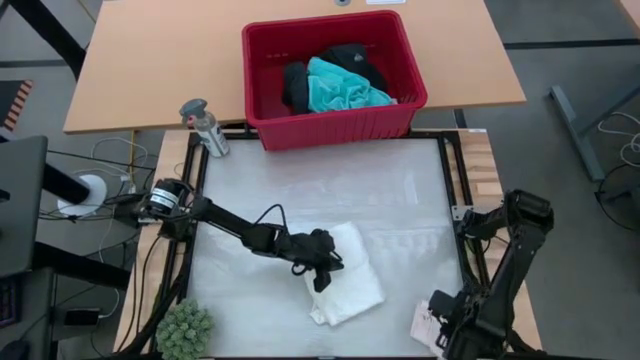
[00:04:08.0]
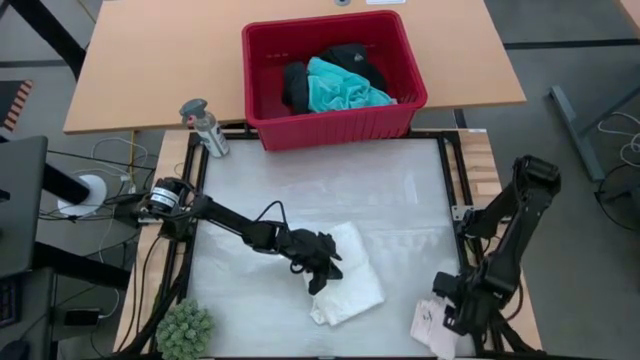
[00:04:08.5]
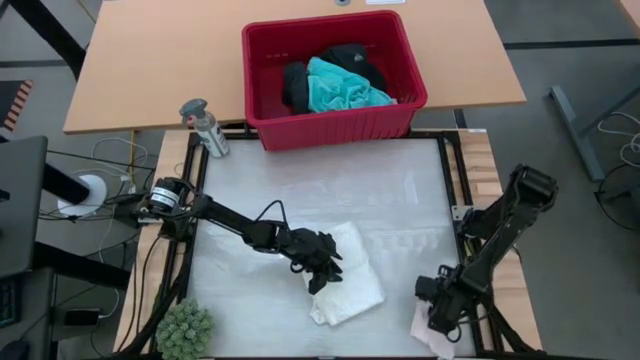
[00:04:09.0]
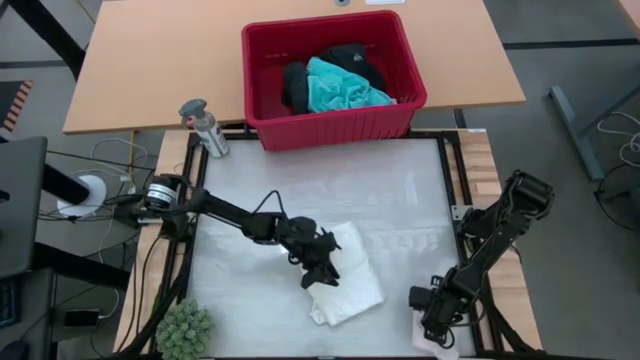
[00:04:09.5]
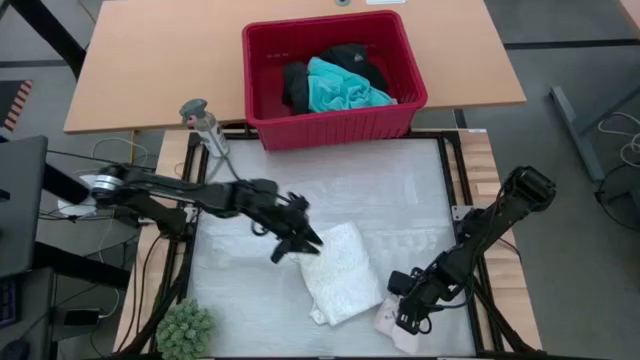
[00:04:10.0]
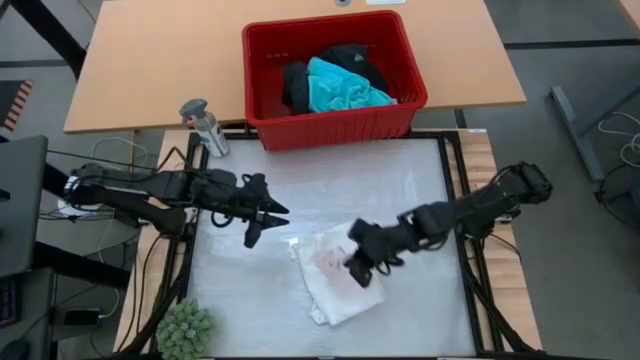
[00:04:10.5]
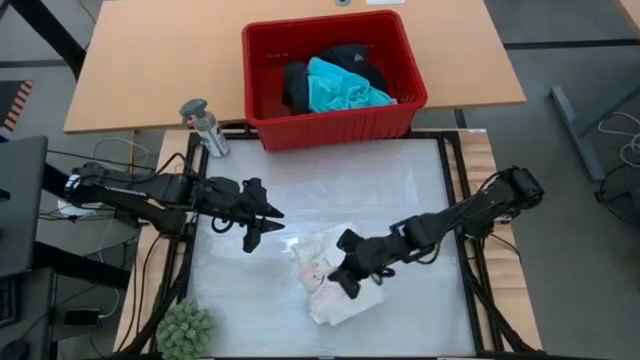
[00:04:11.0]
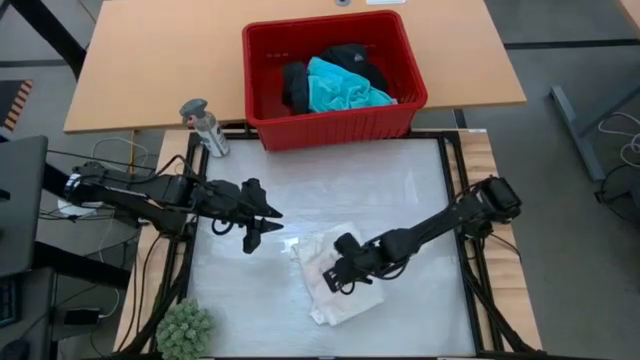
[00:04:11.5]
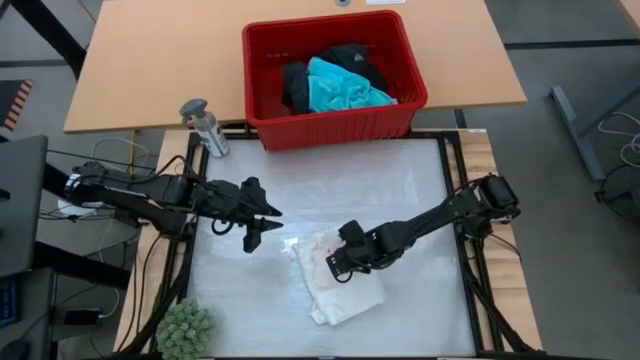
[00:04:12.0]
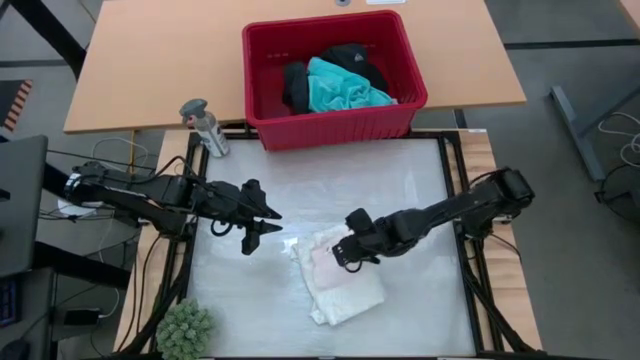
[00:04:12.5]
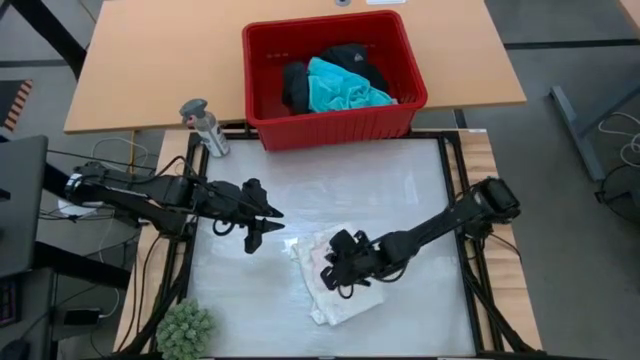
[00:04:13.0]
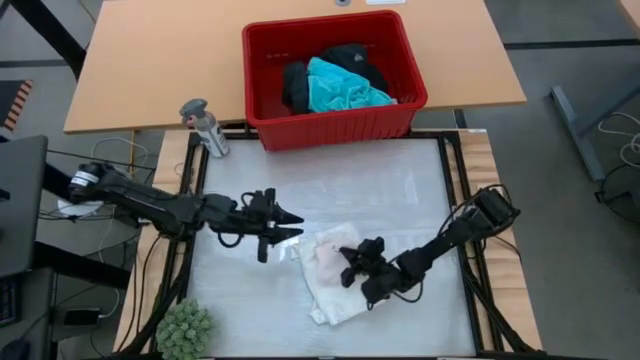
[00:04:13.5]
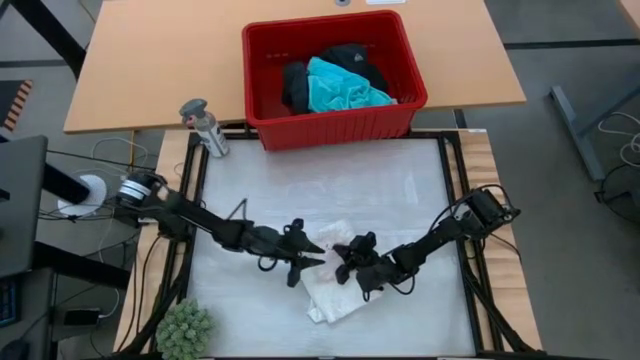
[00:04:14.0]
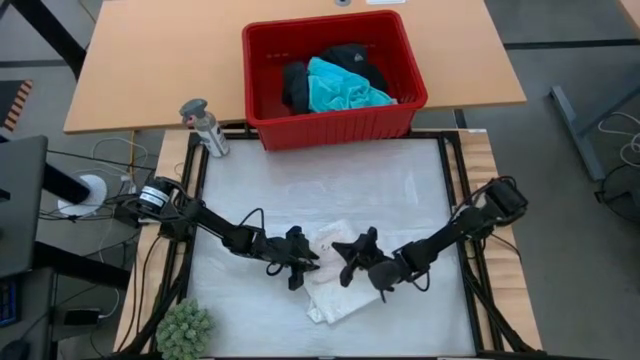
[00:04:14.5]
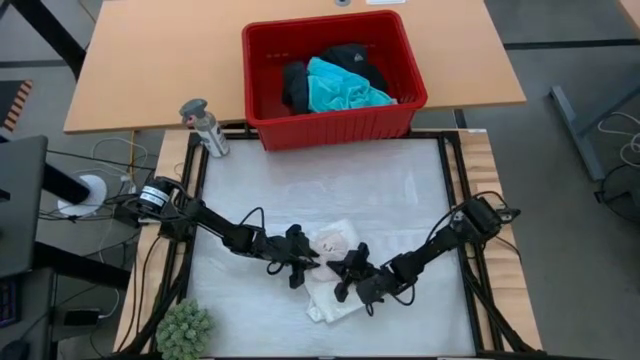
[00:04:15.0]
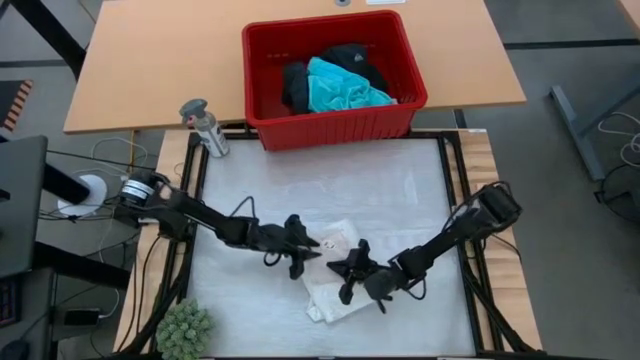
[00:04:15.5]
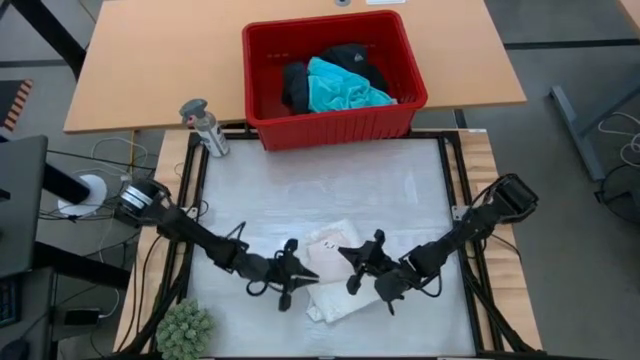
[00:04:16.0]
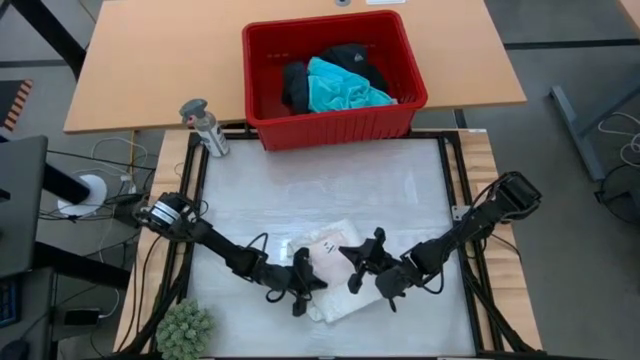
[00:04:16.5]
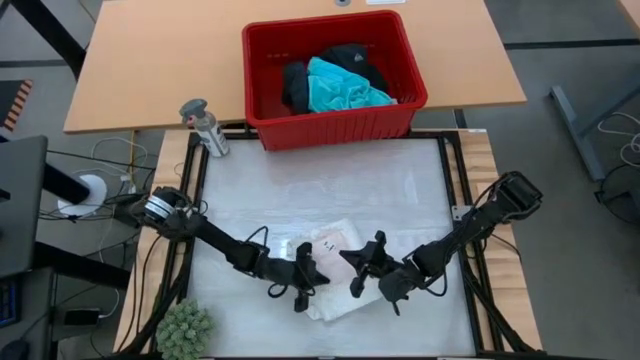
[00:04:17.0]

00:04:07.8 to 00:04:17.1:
Task: Fold Laundry from Bin
Stack the white underwear on top of the white blouse

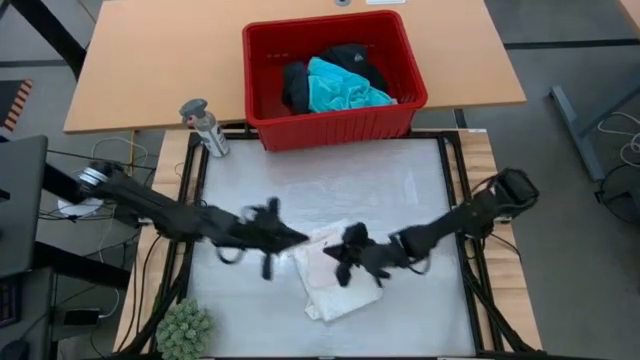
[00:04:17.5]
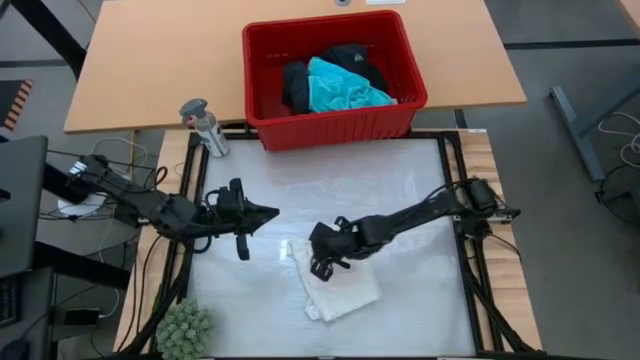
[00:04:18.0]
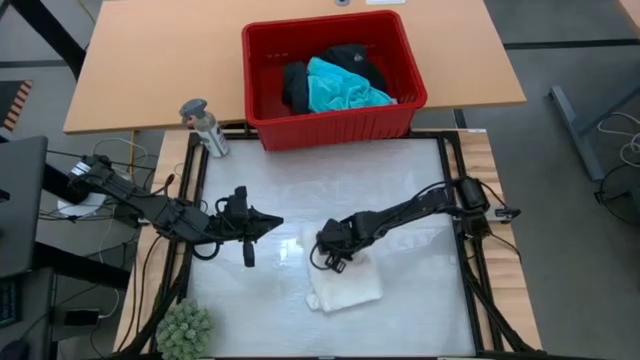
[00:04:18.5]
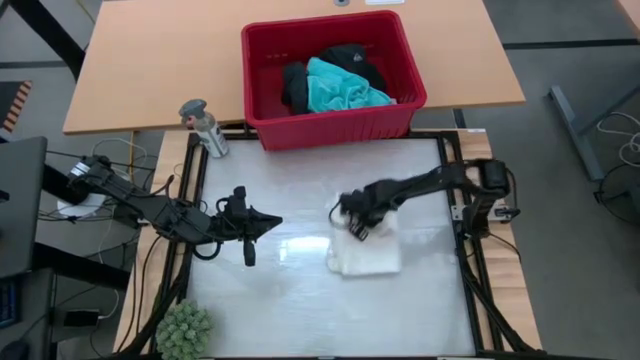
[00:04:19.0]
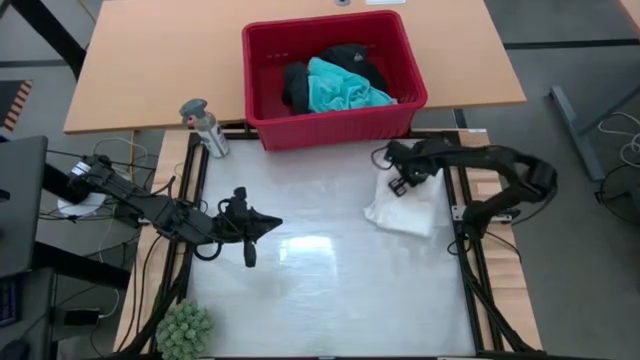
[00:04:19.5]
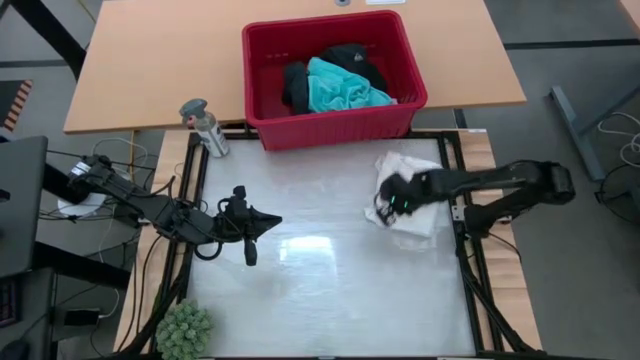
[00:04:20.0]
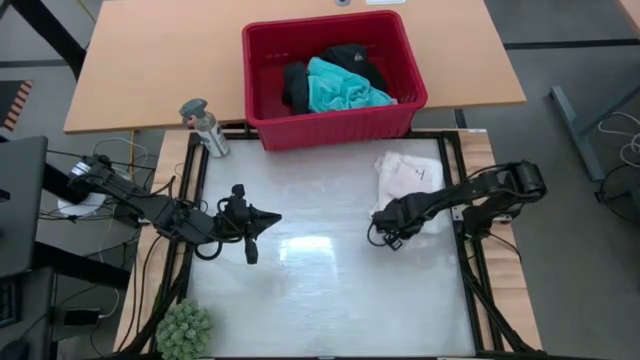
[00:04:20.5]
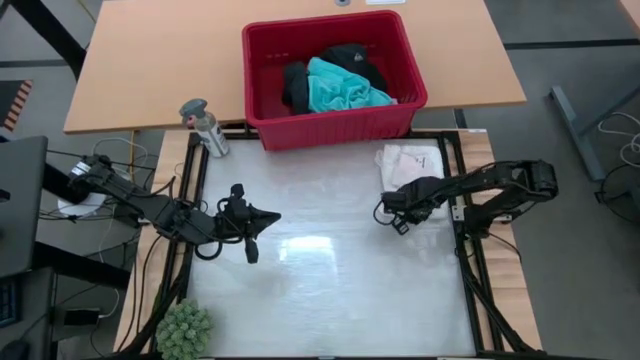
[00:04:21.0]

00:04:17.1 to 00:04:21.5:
Move the stacked clothes to the top right

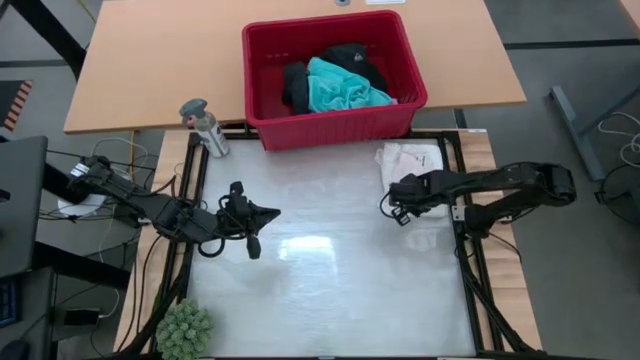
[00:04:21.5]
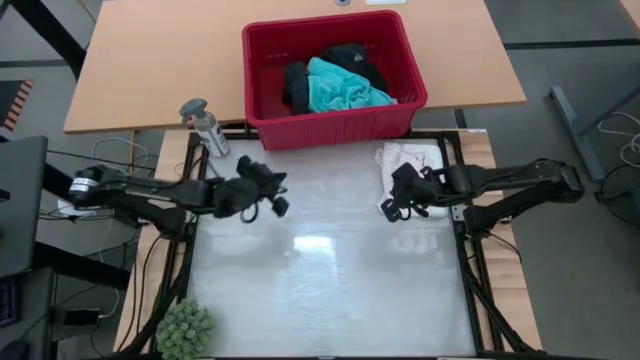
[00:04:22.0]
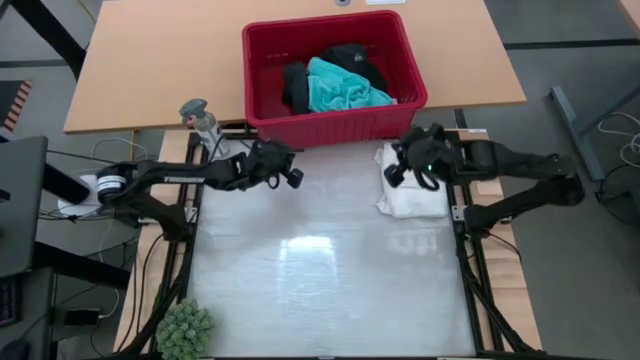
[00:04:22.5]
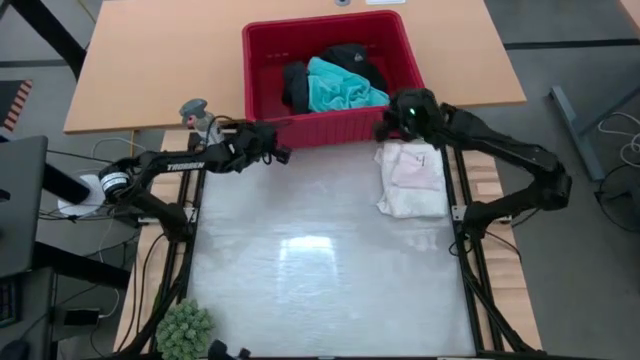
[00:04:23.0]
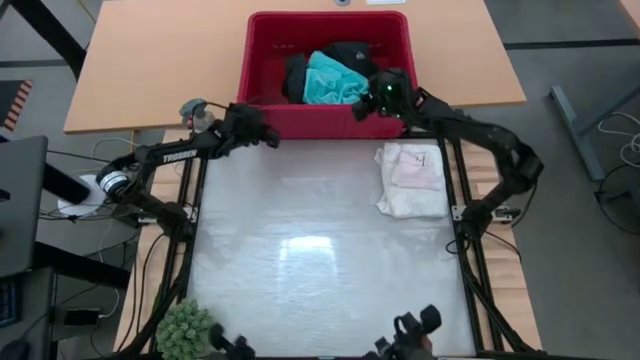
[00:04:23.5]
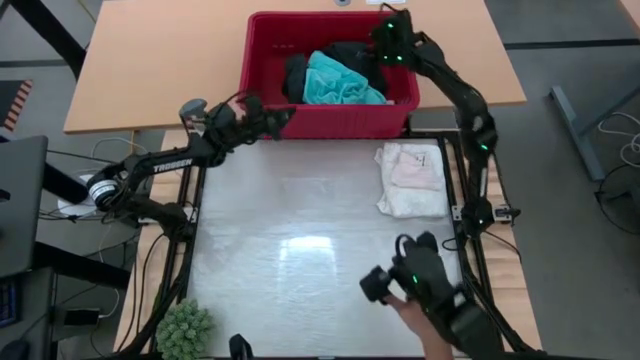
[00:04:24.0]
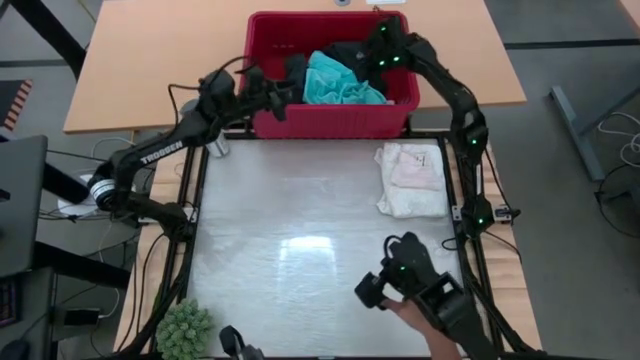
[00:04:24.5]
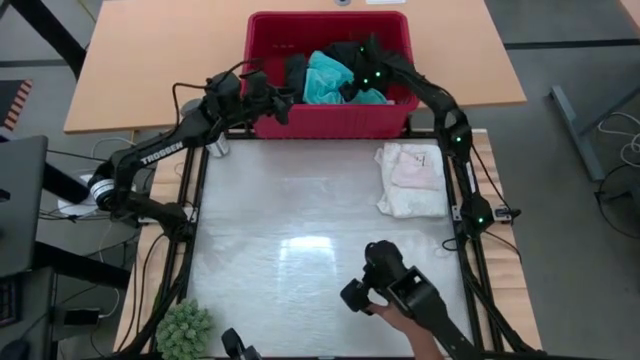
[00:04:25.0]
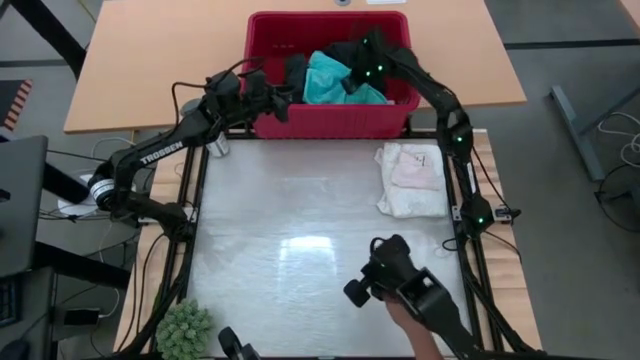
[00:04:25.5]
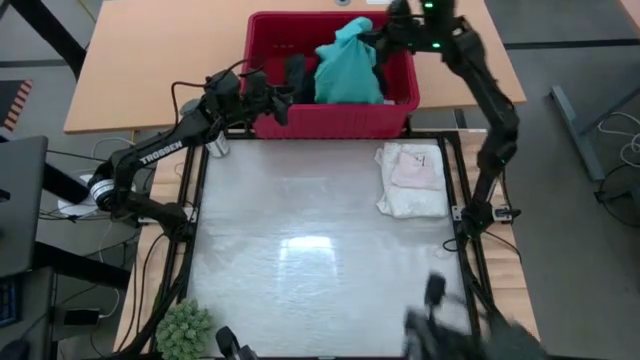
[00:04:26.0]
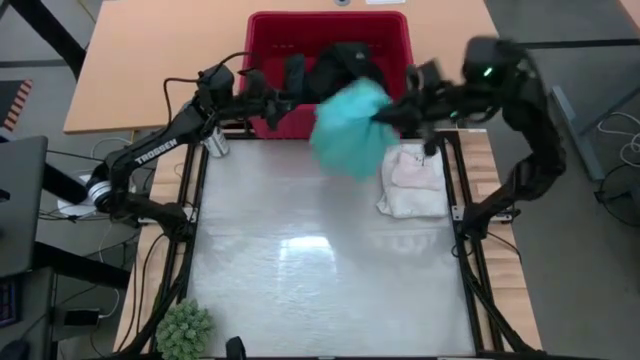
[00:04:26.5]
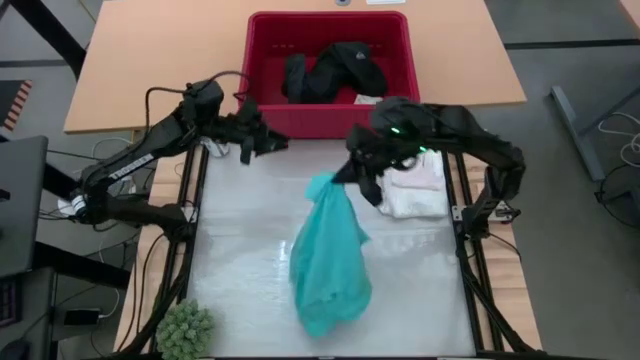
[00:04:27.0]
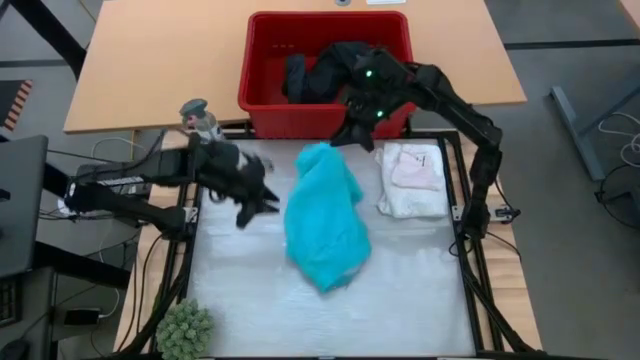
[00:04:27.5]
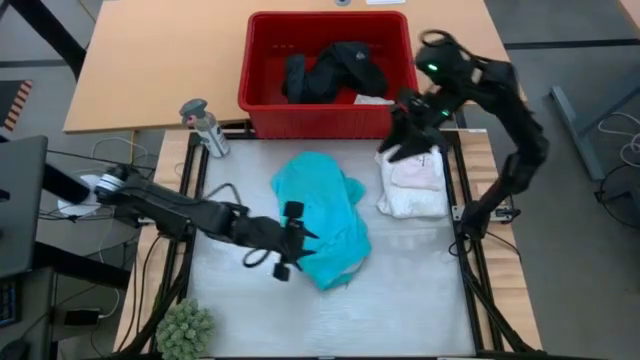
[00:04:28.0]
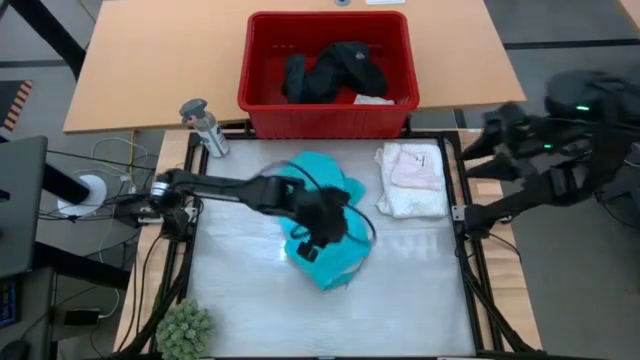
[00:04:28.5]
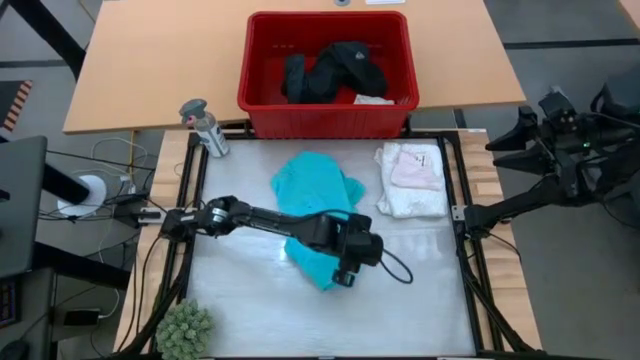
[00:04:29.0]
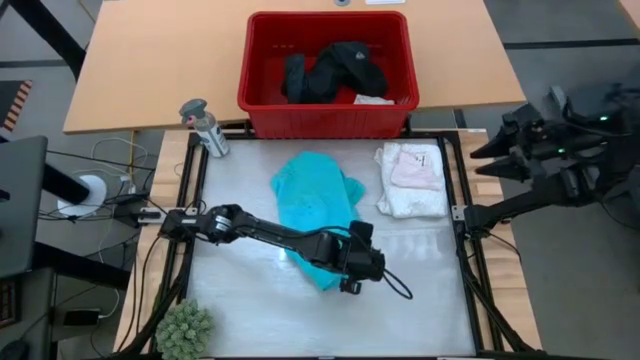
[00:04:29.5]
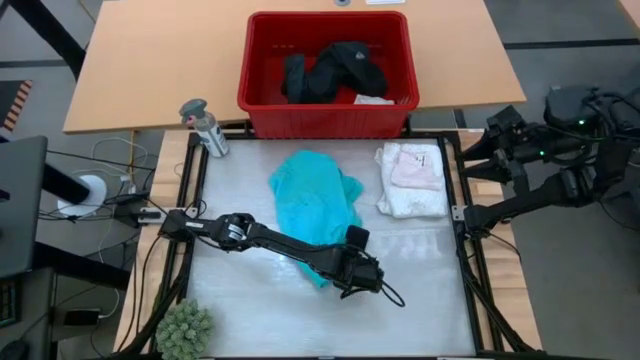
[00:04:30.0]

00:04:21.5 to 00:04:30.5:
Fold the light blue shorts
